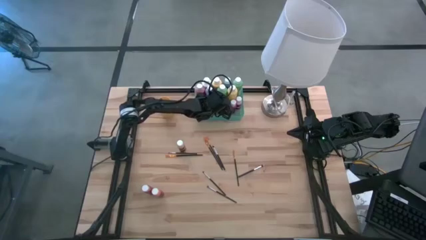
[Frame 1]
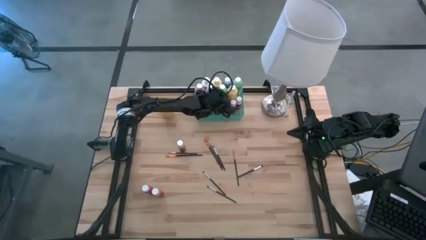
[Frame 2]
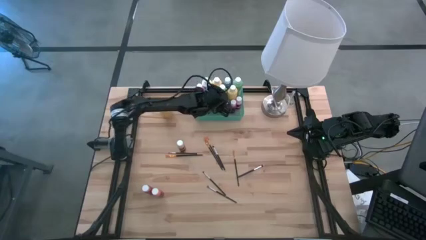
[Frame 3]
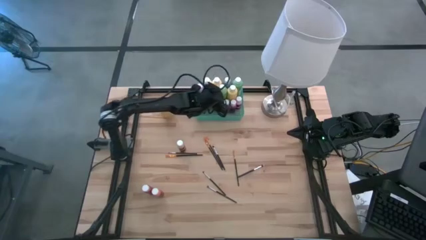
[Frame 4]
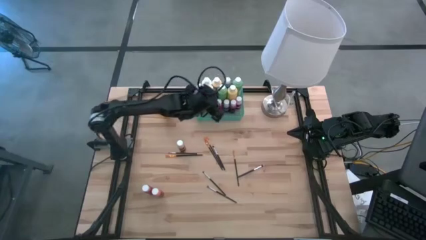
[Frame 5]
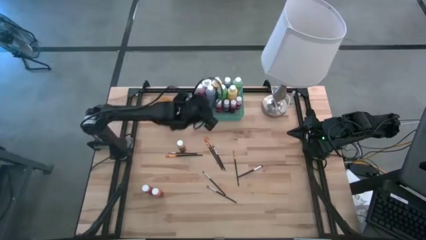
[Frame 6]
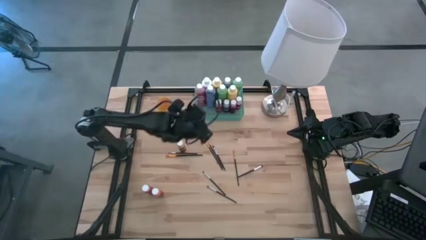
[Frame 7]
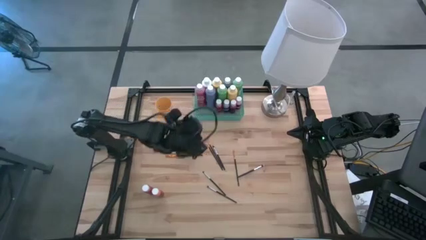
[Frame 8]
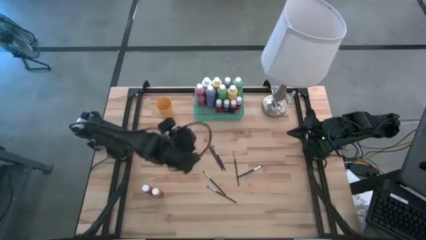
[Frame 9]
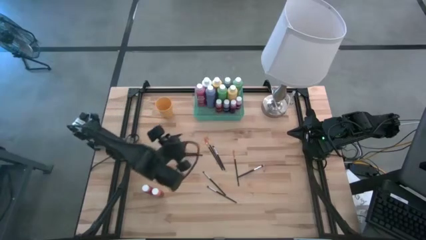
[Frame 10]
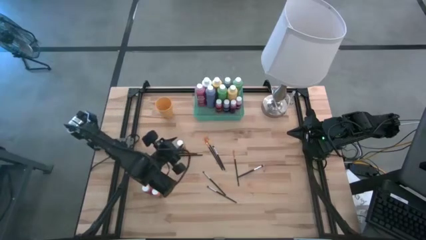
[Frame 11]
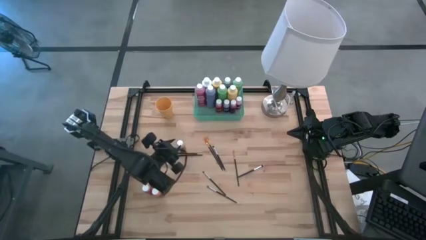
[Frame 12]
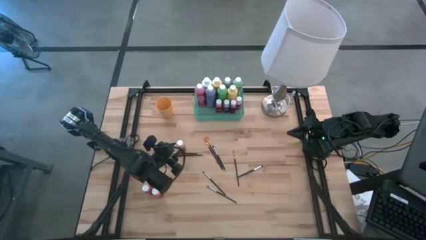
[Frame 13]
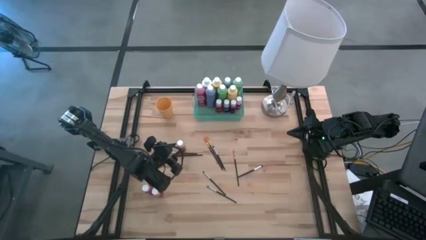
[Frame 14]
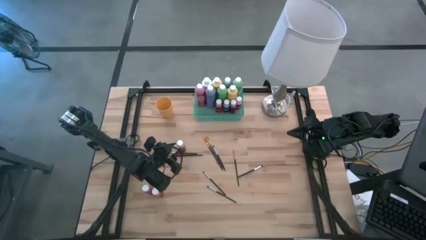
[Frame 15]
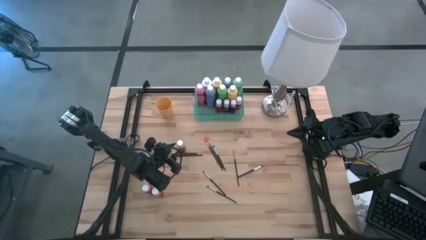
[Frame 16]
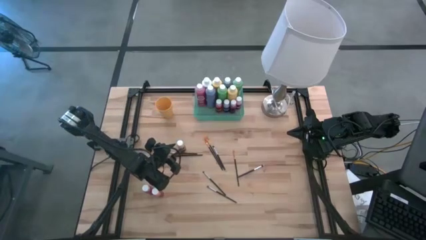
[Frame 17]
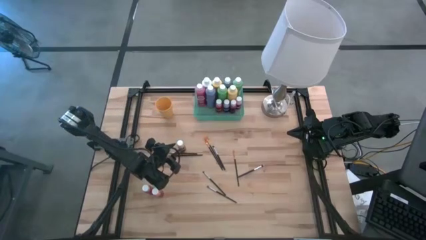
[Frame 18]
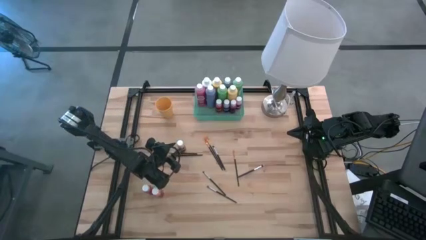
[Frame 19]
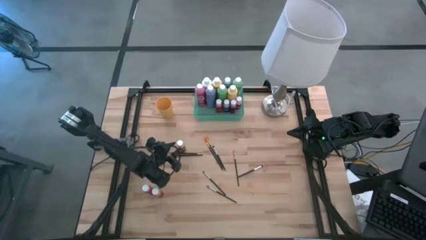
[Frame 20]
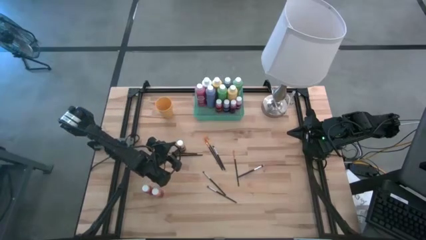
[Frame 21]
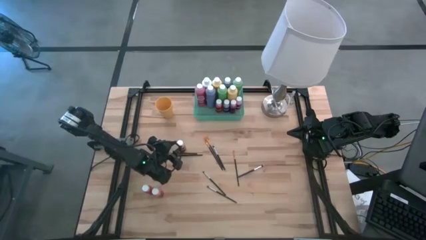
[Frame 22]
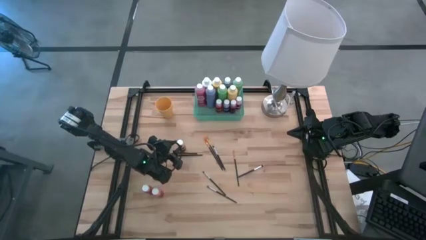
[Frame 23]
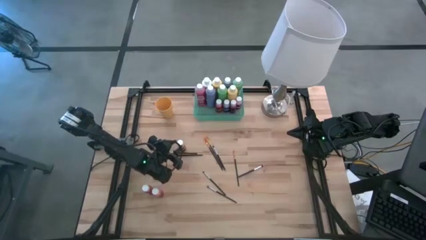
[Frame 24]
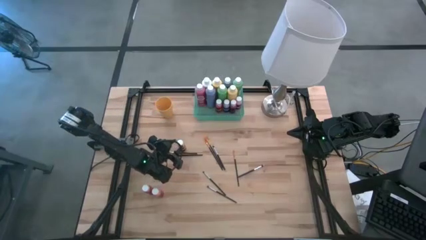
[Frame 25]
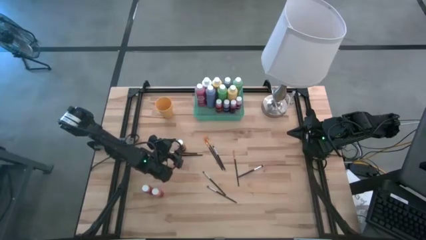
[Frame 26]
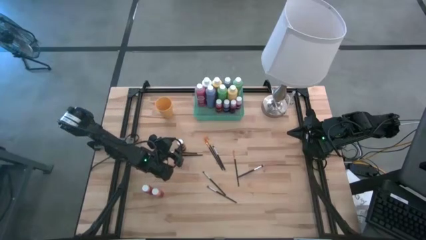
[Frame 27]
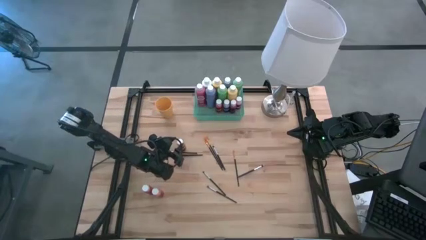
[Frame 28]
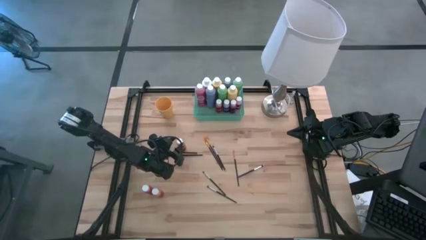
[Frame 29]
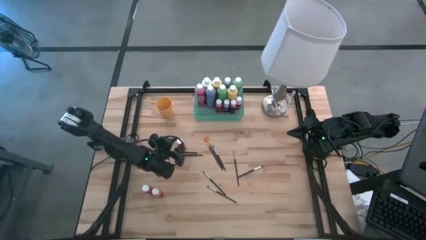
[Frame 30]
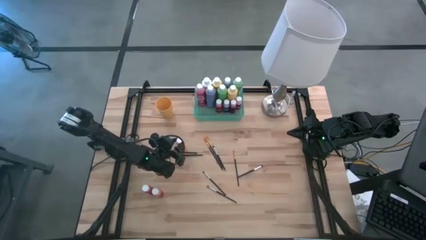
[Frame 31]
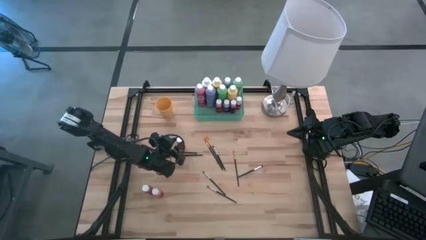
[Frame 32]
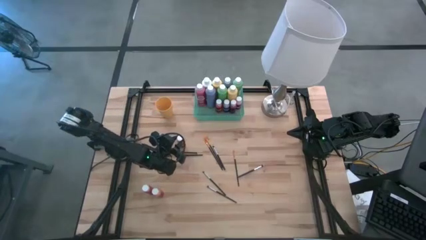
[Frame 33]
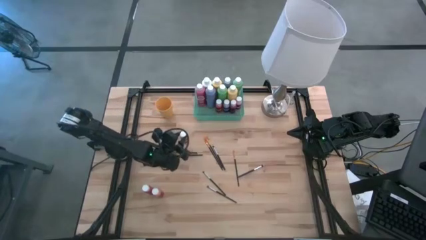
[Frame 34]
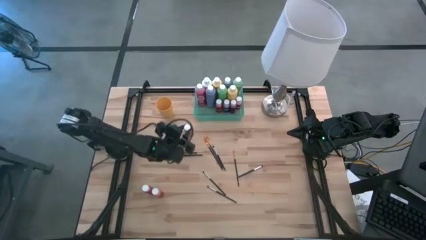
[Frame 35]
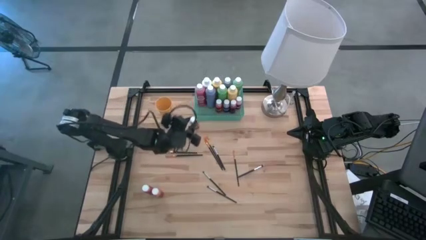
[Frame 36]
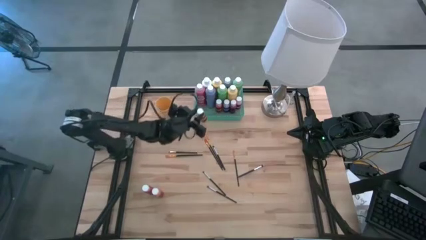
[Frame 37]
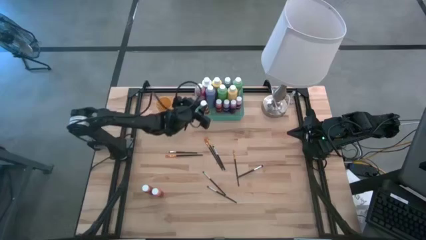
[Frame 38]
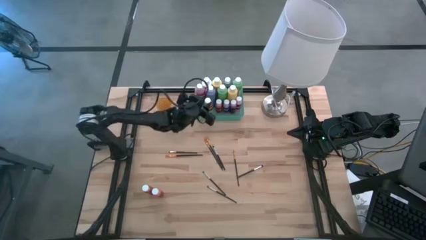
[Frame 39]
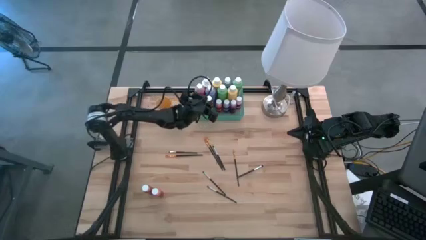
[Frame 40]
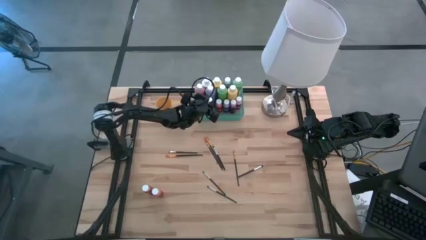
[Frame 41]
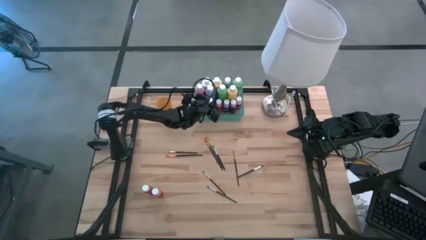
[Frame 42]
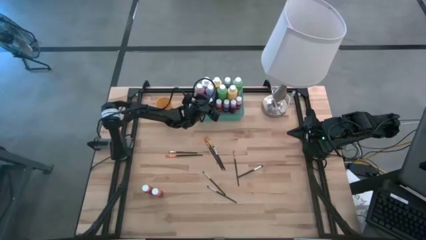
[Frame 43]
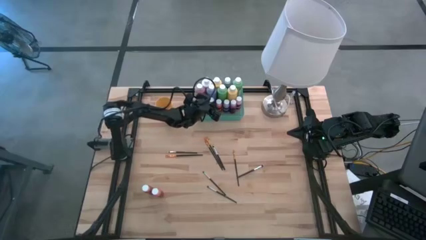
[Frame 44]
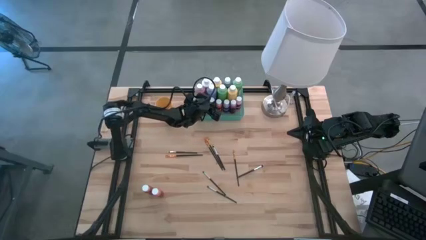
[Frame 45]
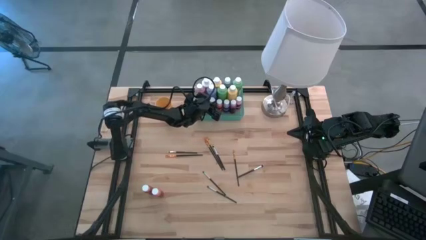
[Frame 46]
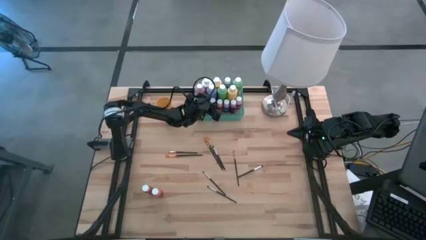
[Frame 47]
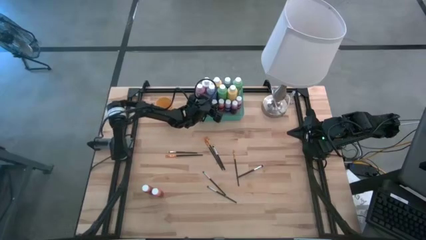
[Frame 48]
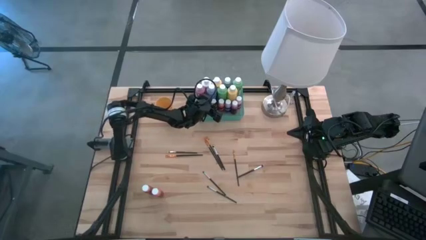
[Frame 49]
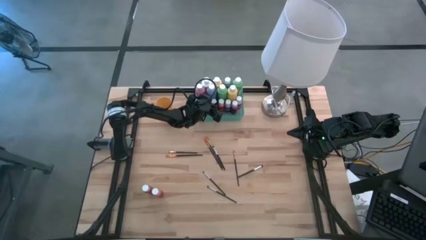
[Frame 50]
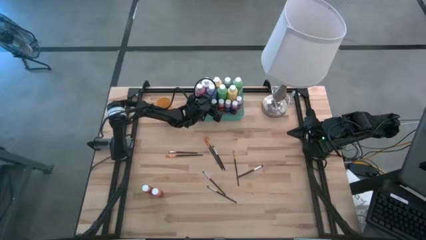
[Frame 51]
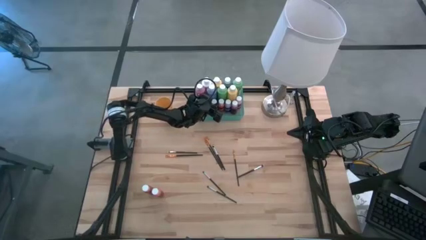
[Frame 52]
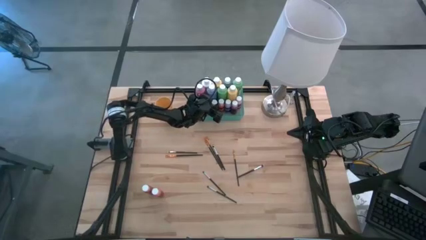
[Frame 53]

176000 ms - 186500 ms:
Task: Pick & Place Paint Supplies
Put the small yellow paint bottle into the green bin

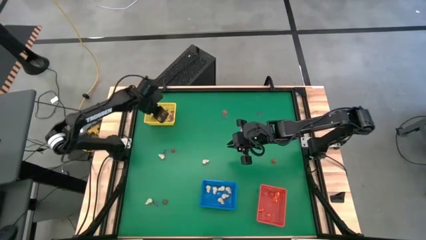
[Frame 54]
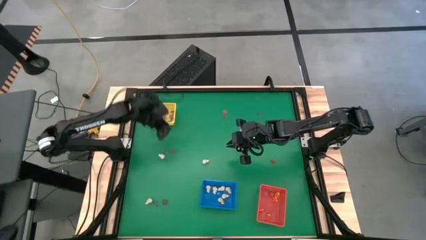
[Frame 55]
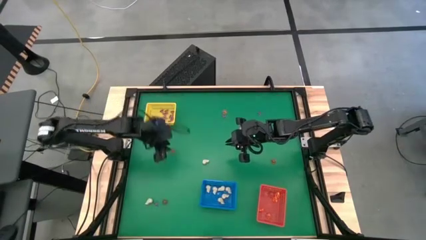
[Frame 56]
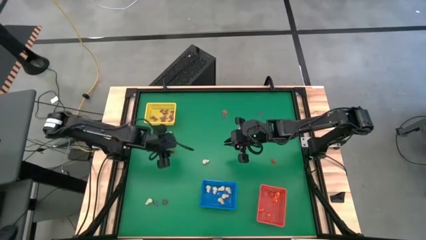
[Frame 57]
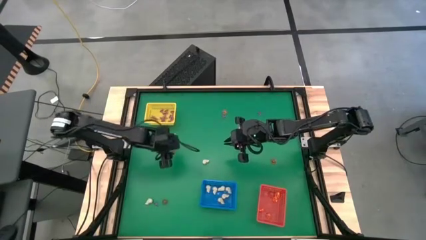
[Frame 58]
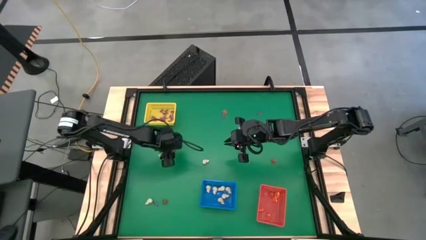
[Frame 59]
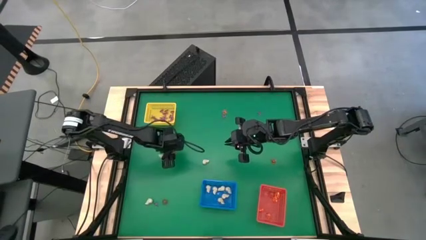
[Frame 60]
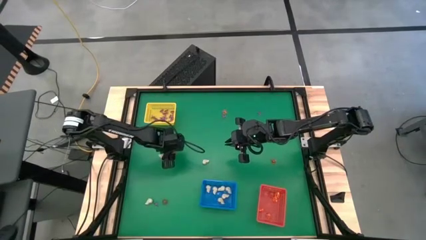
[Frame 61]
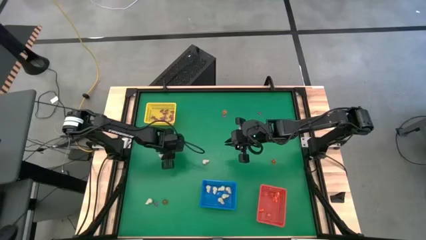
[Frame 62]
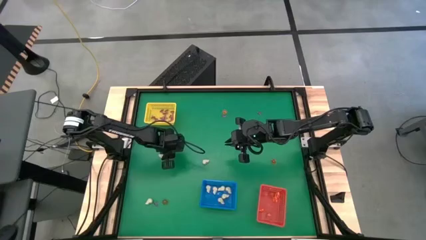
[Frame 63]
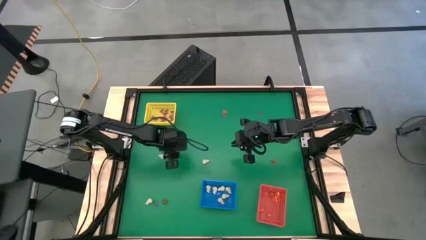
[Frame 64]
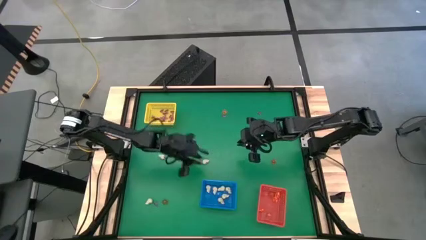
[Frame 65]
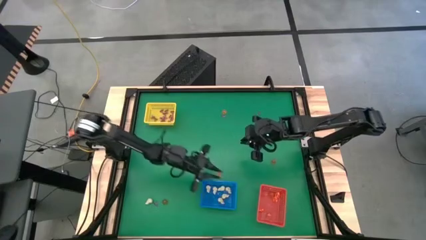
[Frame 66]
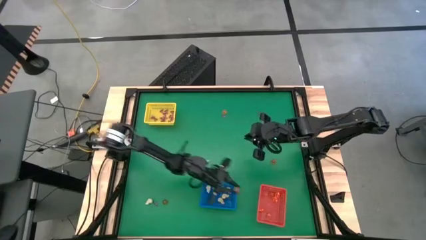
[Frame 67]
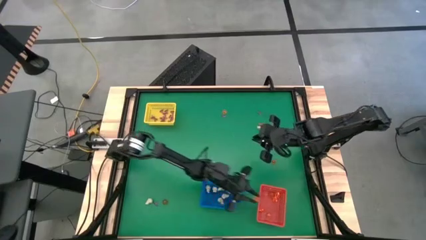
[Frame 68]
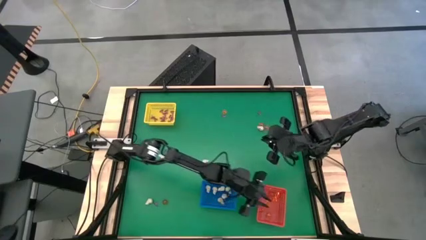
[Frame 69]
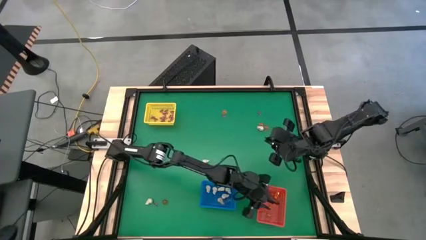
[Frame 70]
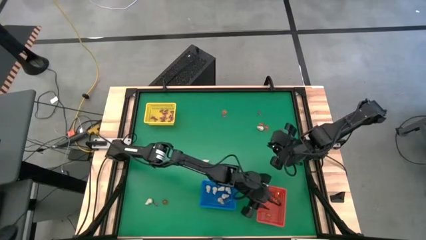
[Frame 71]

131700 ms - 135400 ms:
Task: Sort Halloween decoration
Put the orange pumpkin toy into the orange basket
